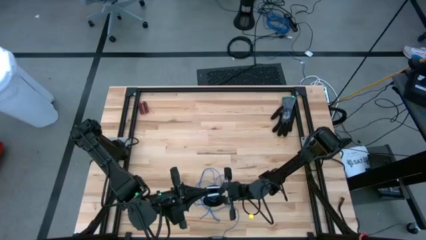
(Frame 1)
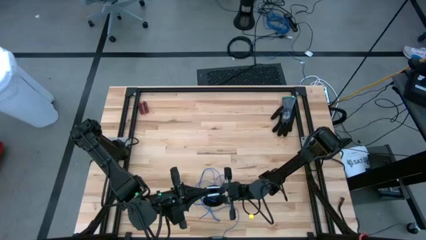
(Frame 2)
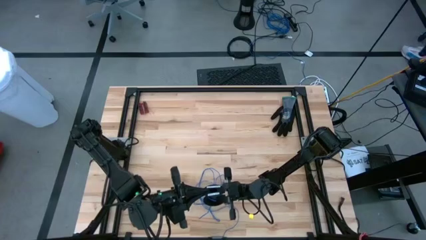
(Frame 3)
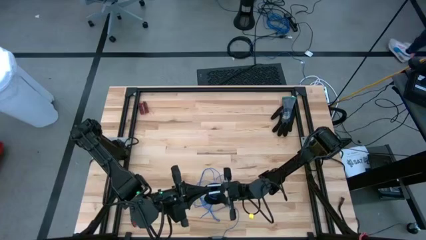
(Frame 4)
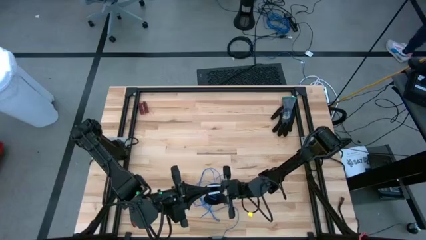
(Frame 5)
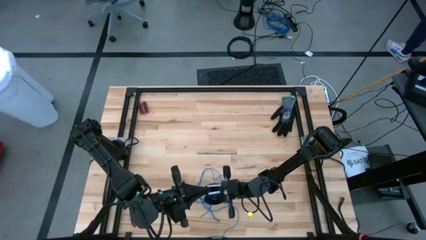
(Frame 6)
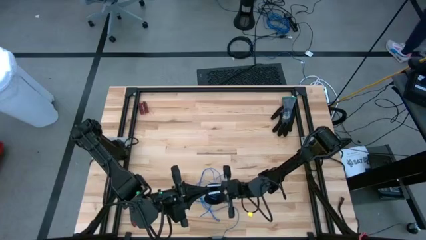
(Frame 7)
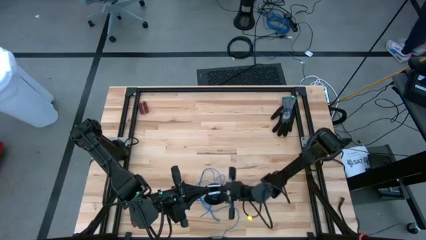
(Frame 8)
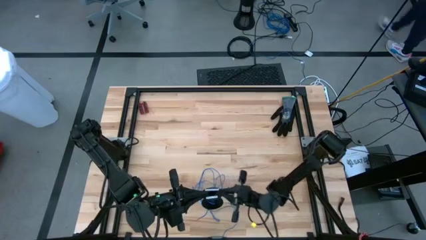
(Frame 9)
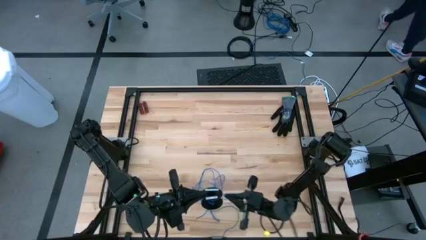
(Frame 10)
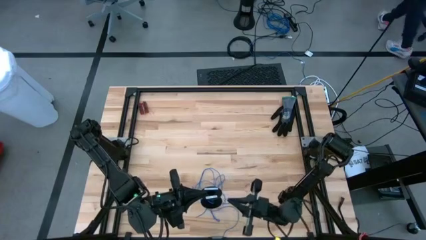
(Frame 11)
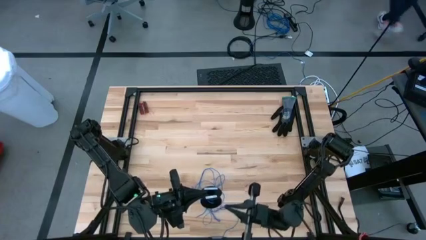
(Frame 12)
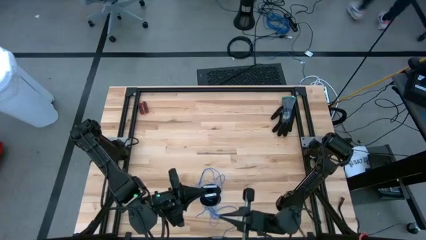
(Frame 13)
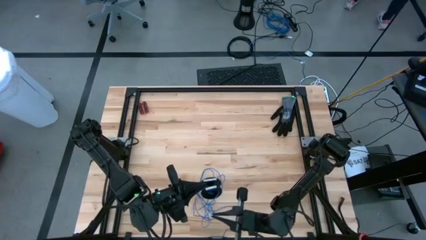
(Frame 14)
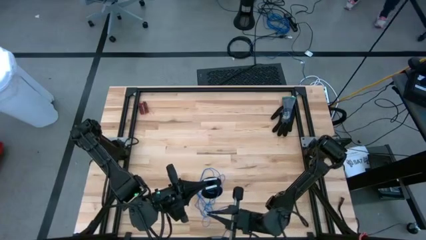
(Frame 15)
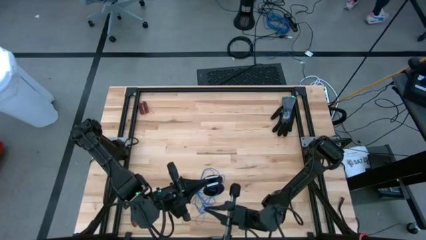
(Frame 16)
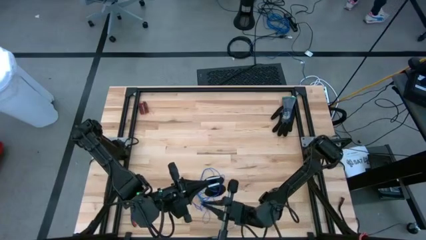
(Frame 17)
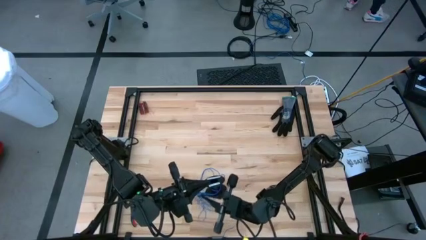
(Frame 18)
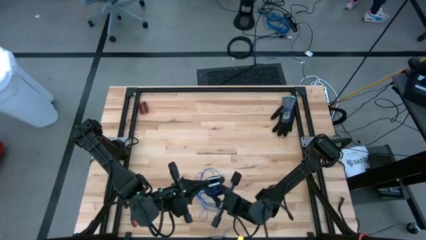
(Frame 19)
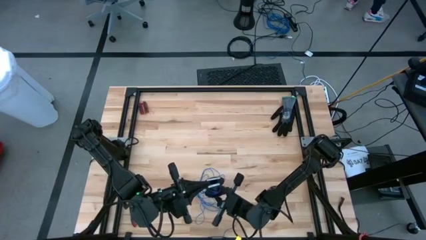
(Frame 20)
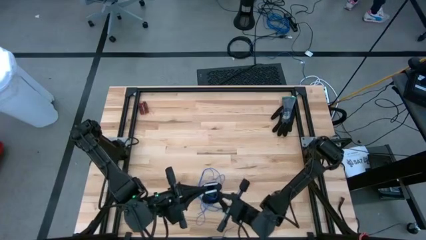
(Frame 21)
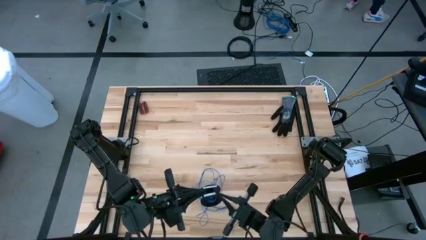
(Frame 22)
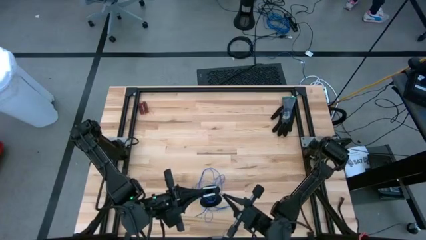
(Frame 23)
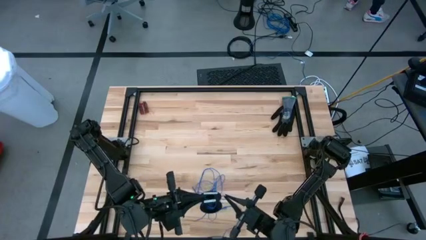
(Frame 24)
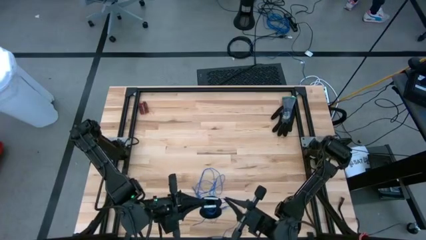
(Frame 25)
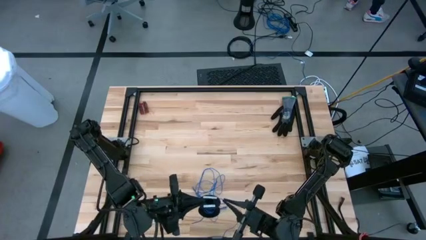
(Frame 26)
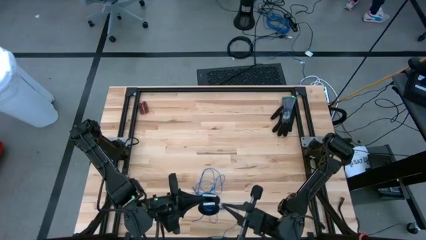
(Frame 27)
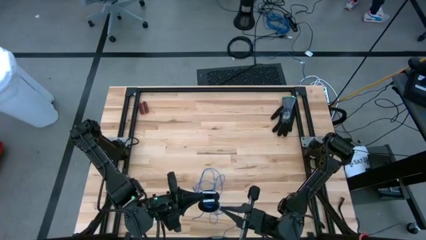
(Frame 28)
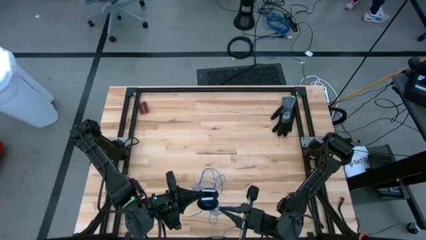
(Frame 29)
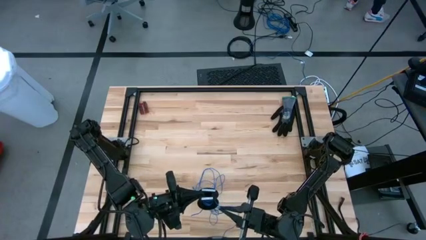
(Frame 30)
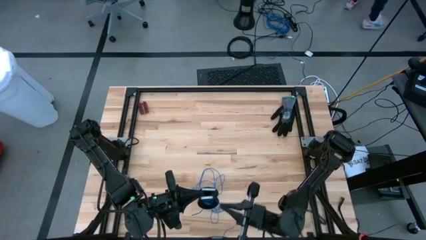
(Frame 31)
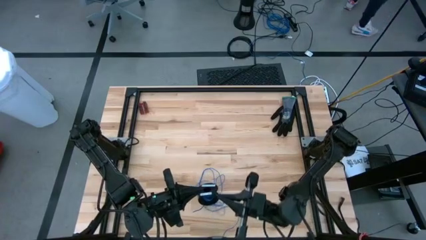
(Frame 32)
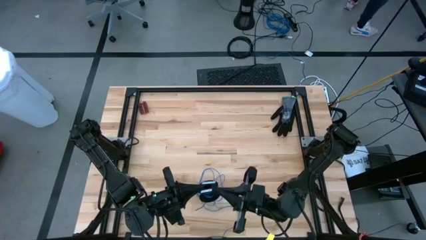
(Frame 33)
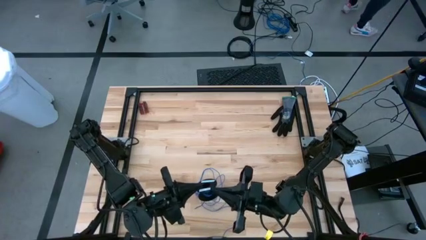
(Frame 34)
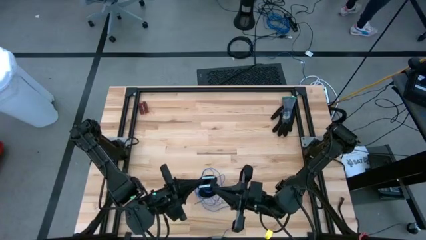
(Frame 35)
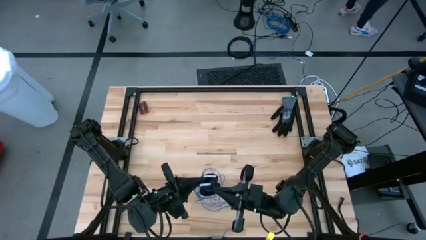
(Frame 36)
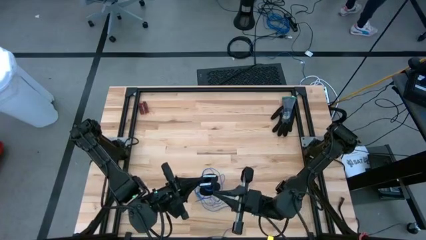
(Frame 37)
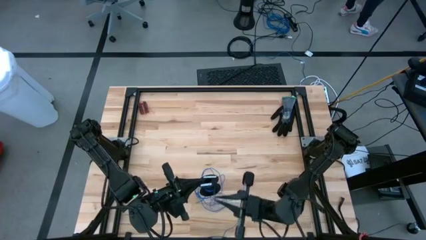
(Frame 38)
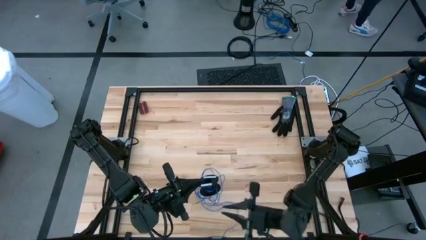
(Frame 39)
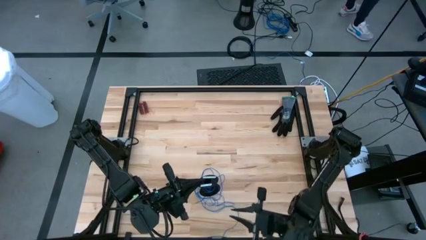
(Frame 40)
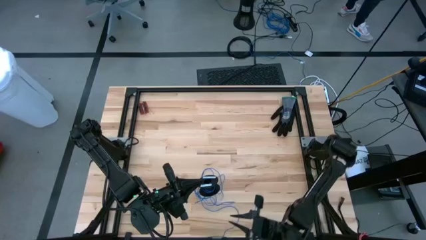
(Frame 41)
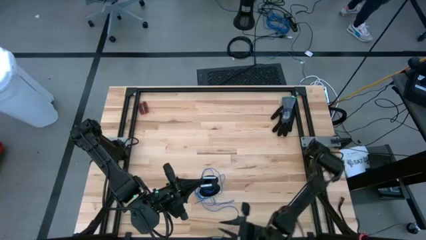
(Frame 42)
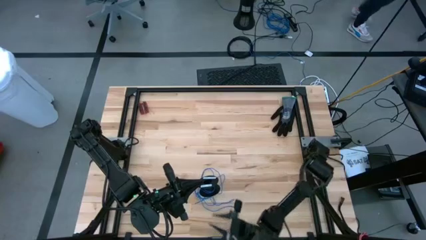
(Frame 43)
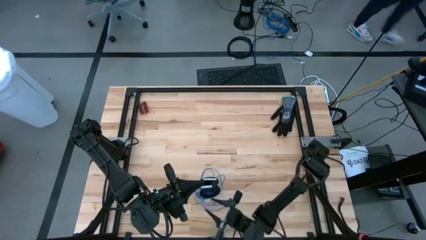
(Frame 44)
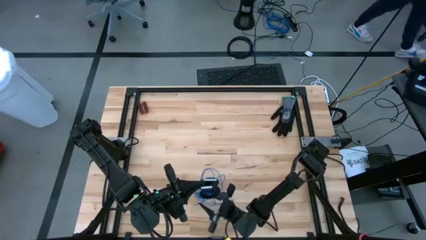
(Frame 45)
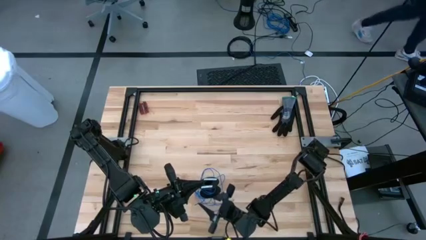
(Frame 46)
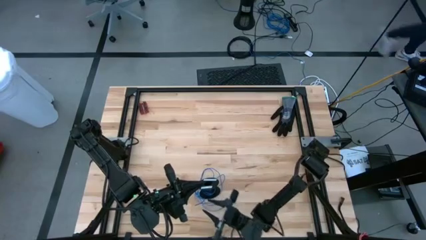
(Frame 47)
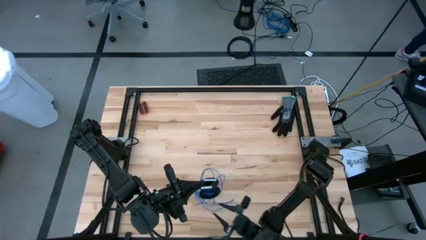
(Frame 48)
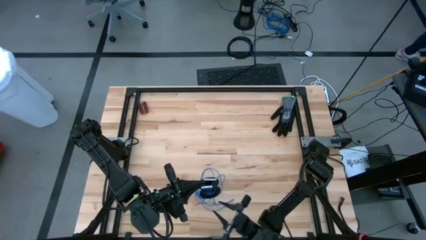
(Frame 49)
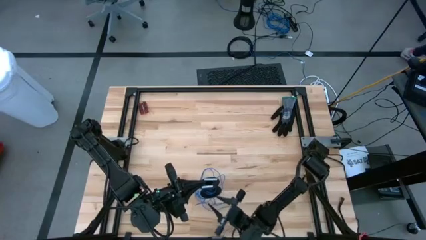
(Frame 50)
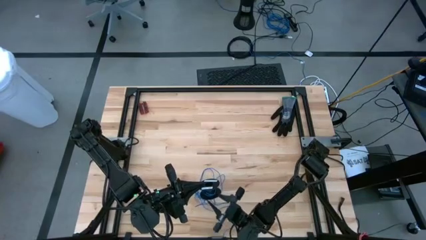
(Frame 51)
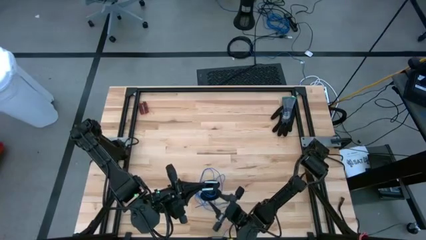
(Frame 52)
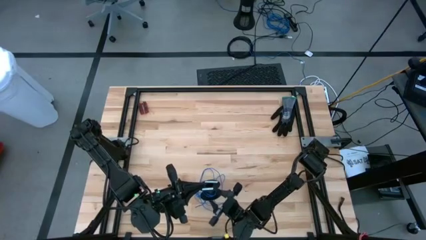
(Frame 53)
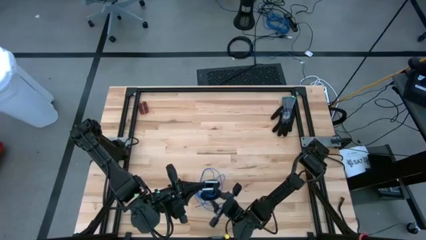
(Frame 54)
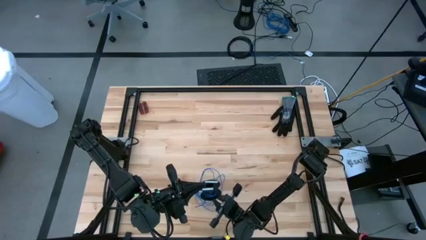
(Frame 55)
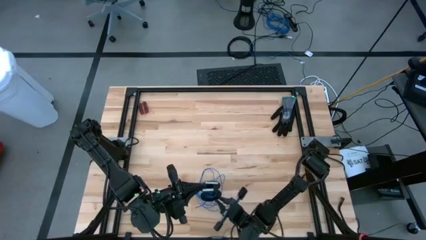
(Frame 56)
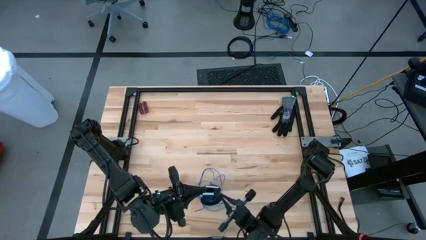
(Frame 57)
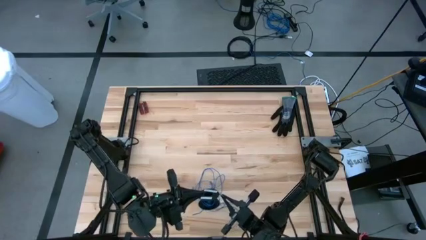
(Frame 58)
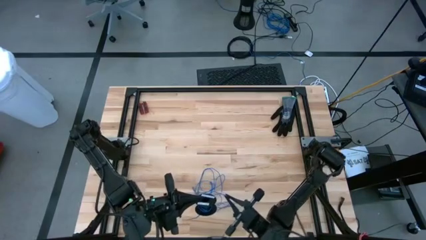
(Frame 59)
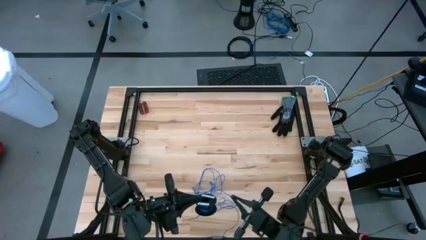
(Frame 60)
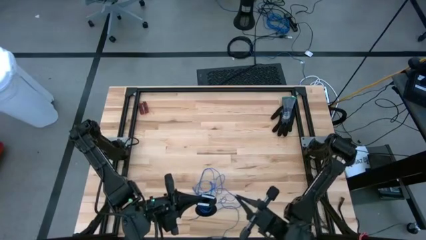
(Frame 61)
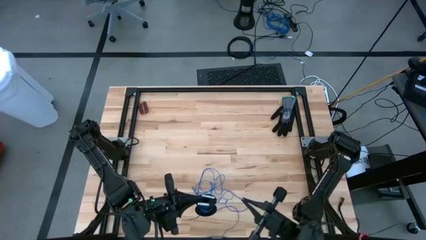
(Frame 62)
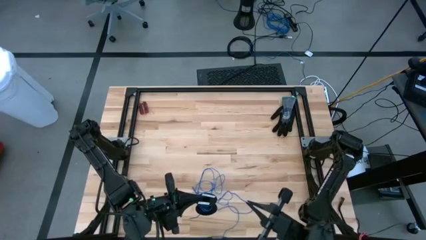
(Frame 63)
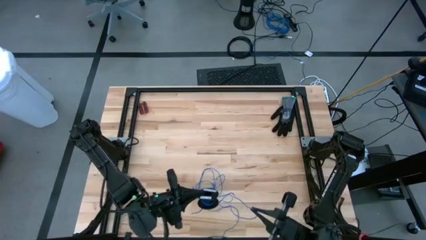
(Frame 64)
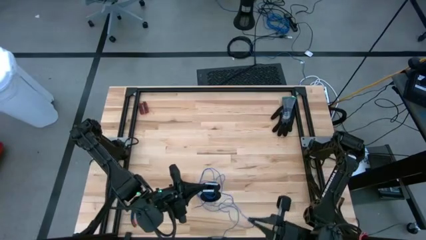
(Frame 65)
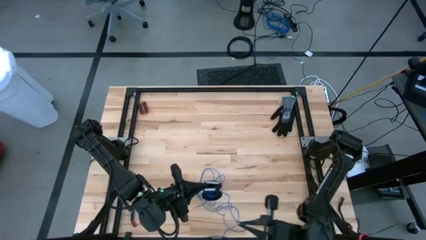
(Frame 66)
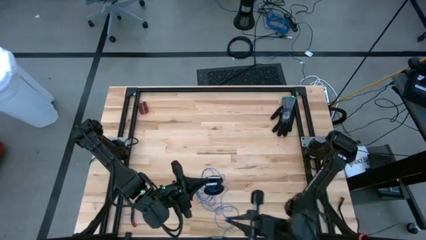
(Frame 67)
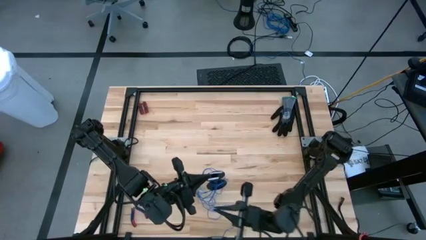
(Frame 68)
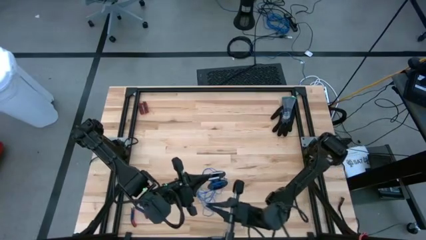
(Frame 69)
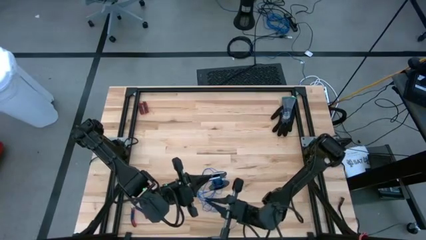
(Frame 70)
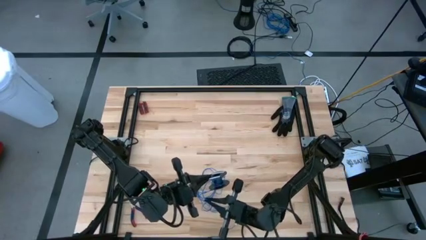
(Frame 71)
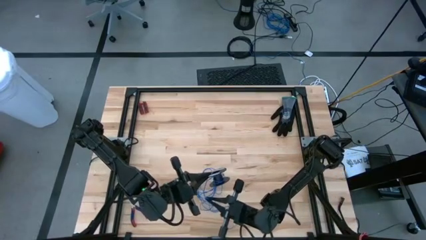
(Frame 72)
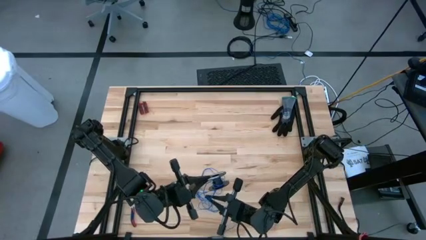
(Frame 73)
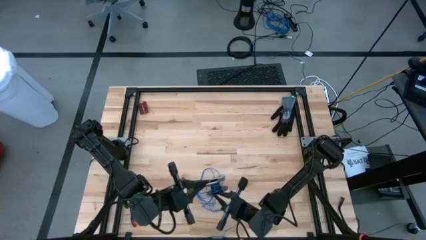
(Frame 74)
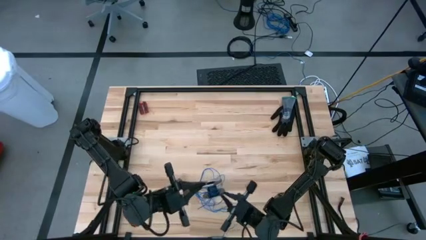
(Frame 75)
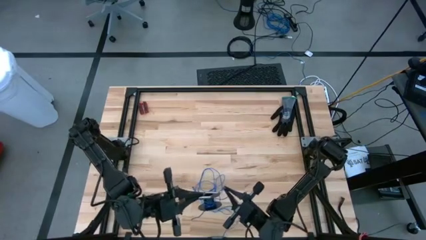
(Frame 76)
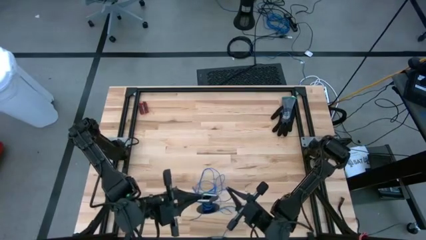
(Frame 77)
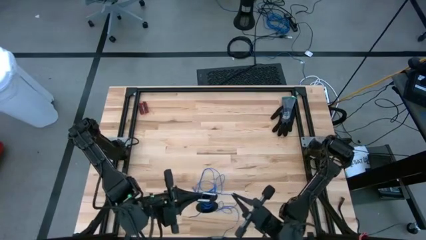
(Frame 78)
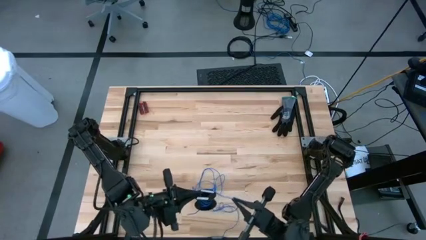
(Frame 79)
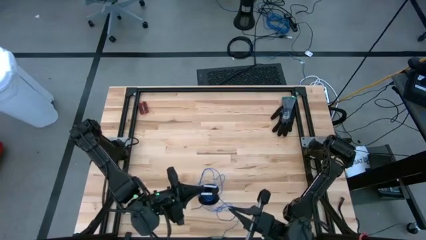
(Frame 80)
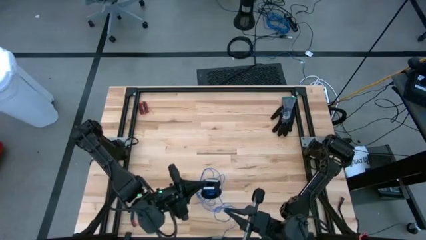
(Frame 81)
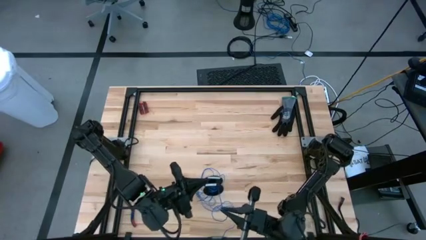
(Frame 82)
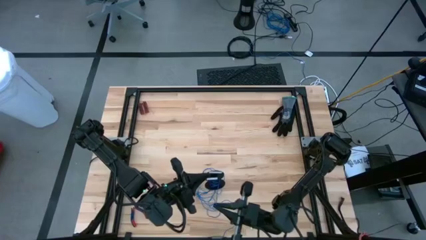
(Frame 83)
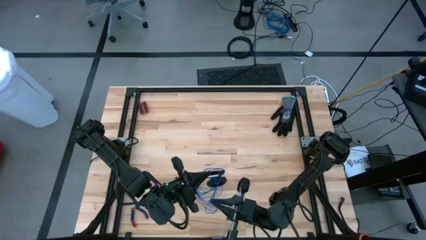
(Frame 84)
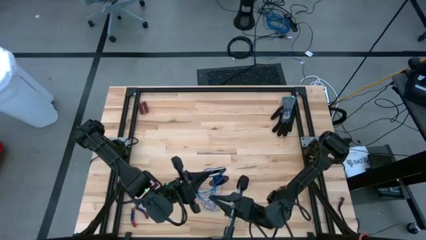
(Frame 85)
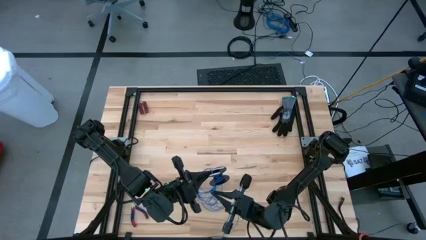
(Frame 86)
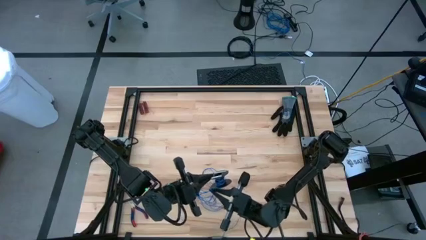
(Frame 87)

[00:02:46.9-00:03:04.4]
Task: Coil cords
Coil the blue wire onto a spool
